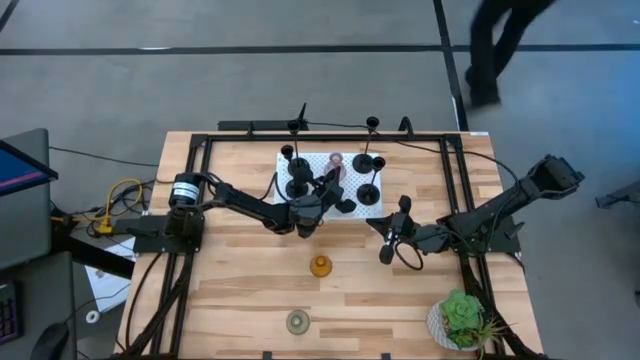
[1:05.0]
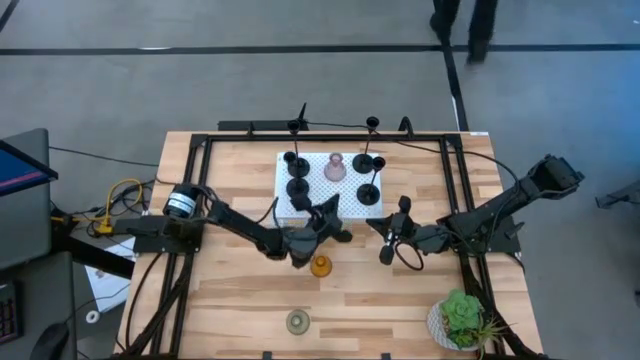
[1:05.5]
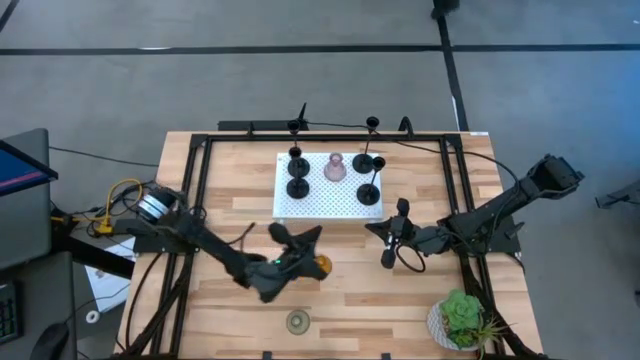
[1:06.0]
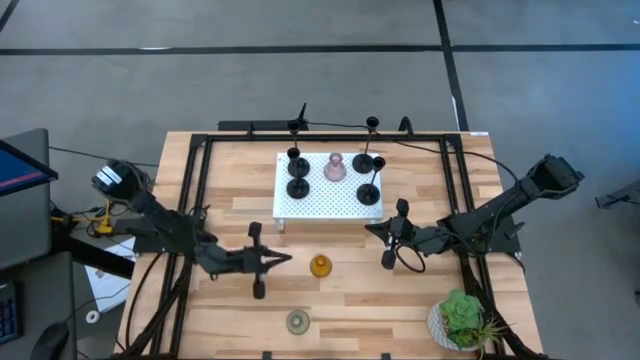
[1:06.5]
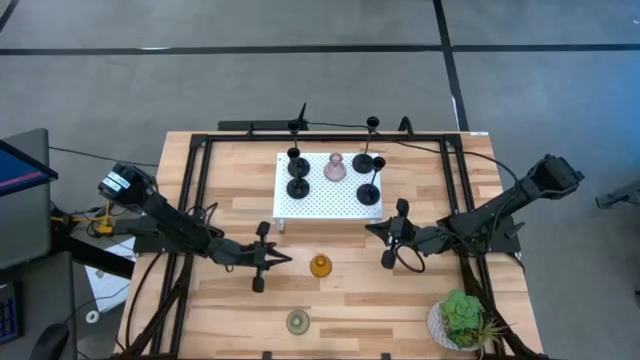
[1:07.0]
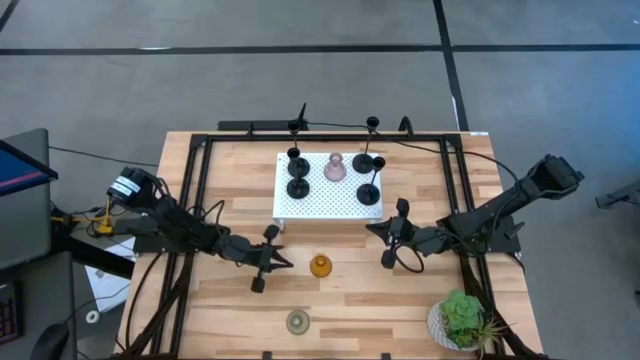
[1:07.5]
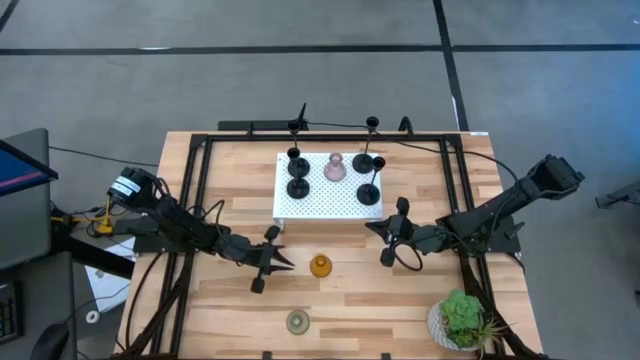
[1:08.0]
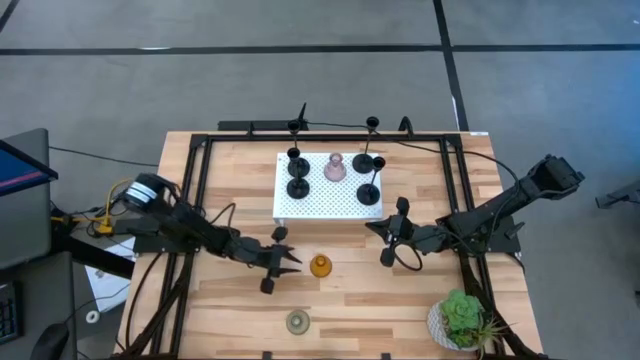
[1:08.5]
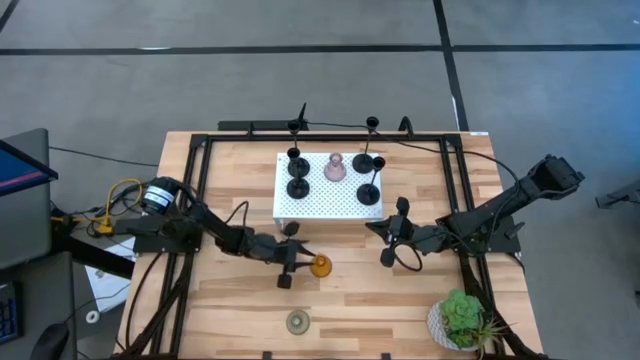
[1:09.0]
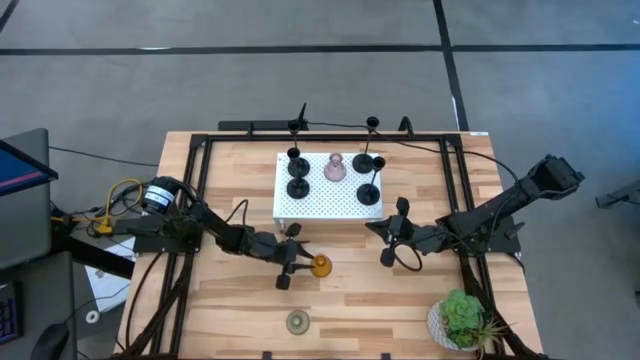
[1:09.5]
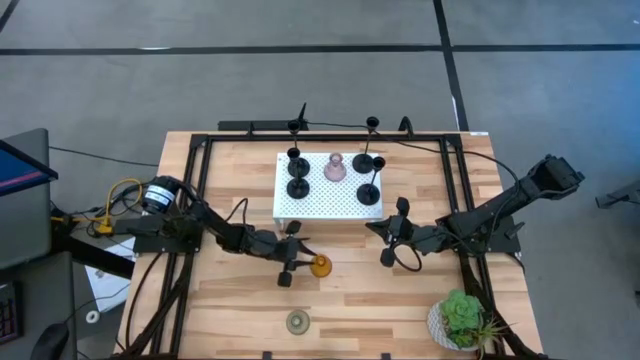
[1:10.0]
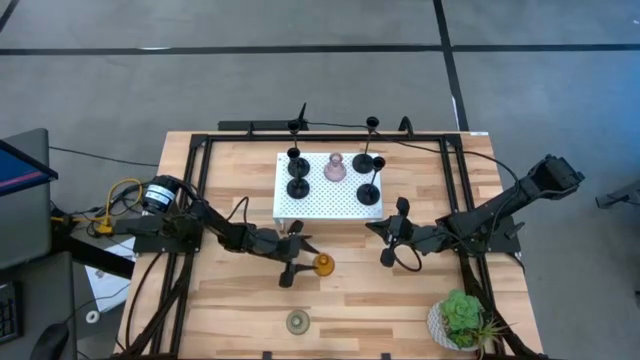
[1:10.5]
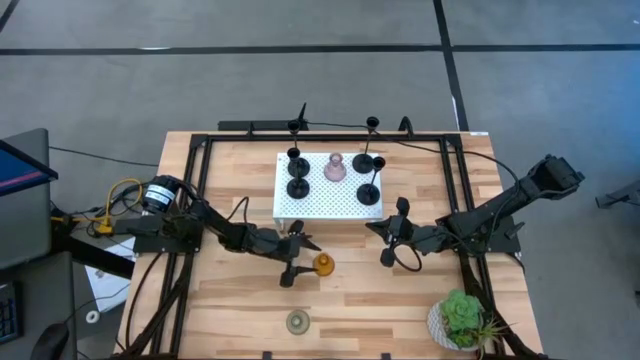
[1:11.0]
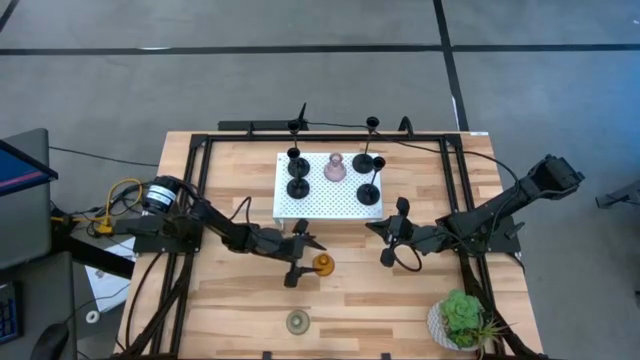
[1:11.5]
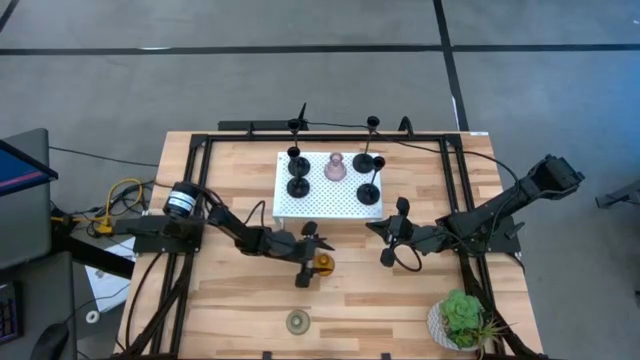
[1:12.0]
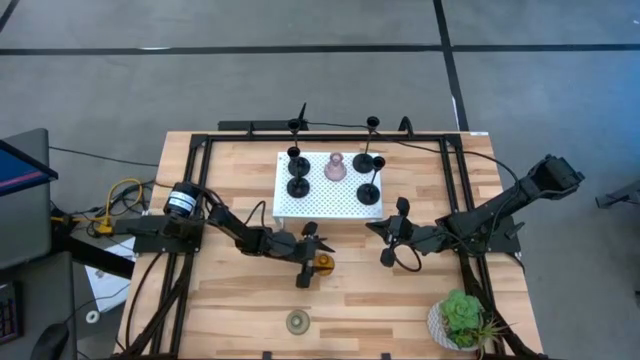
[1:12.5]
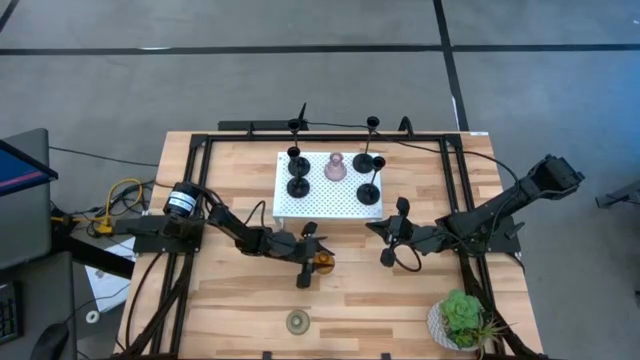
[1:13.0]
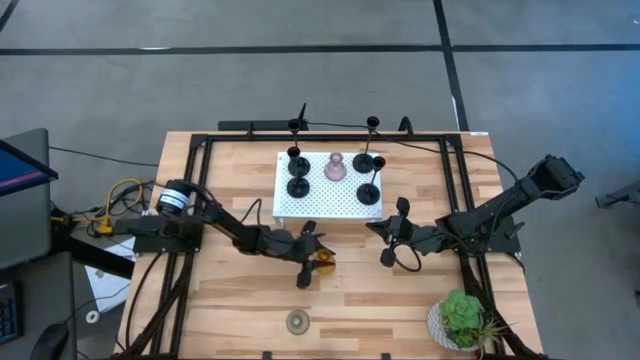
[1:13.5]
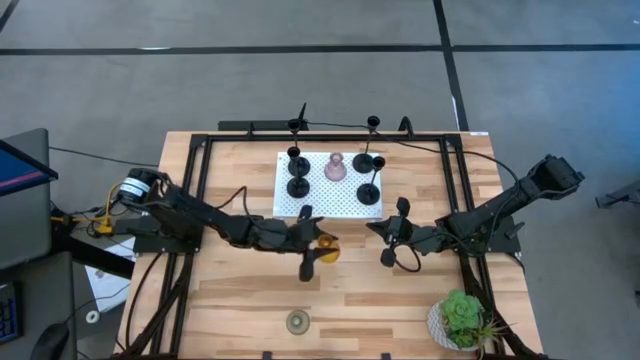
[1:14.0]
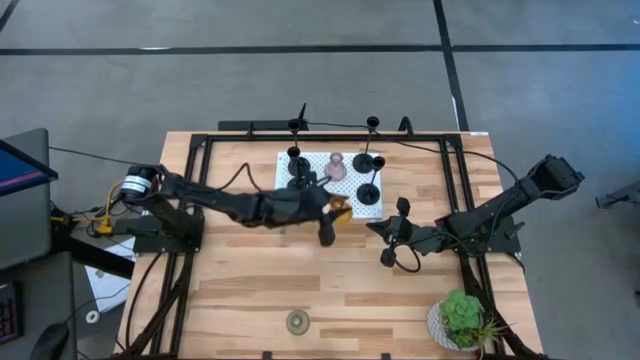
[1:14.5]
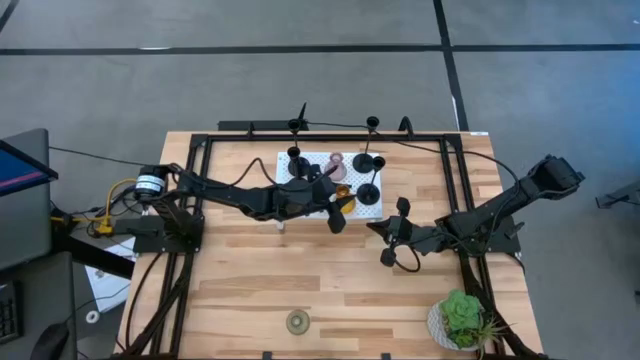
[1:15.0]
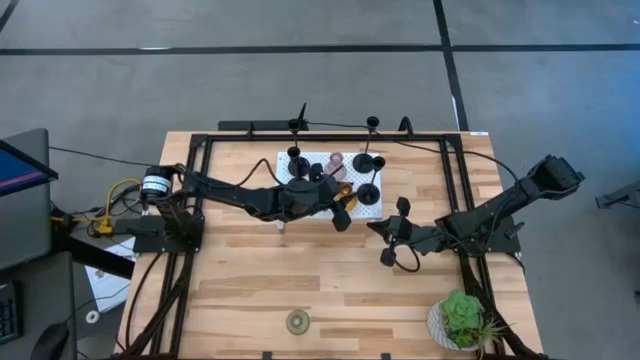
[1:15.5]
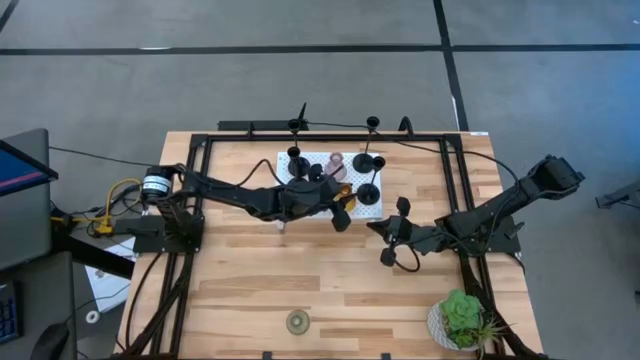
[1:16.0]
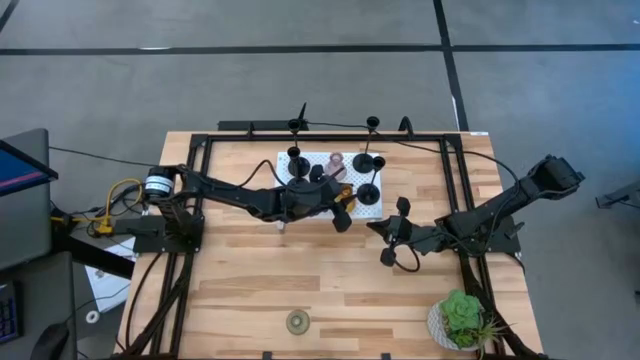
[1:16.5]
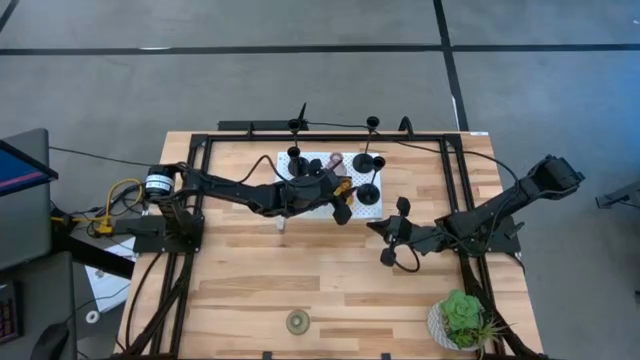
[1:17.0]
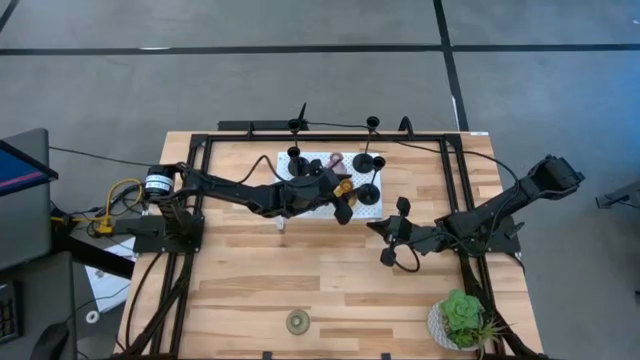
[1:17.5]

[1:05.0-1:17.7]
Task: Pick & Place candle stick holders
Put the yellow candle holder on the shelf
